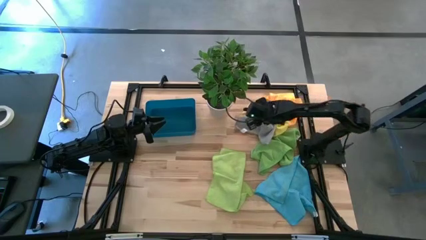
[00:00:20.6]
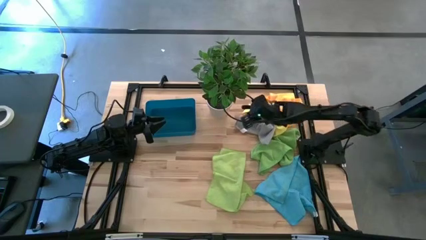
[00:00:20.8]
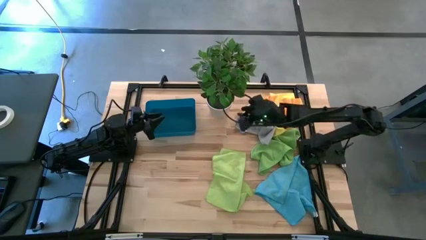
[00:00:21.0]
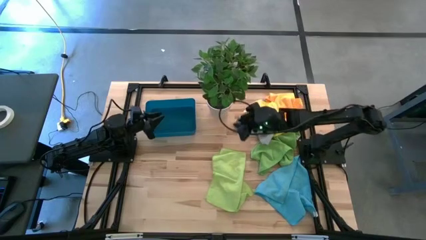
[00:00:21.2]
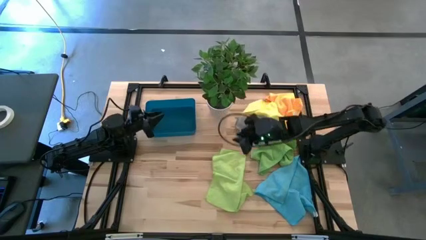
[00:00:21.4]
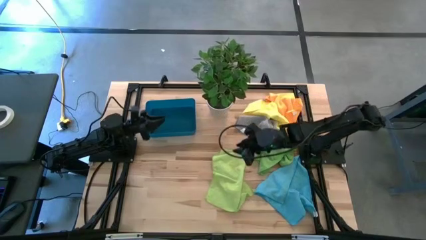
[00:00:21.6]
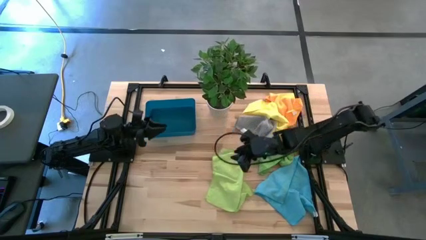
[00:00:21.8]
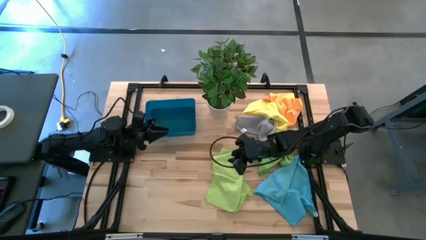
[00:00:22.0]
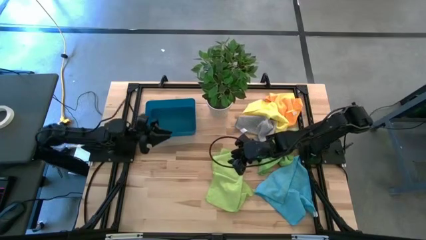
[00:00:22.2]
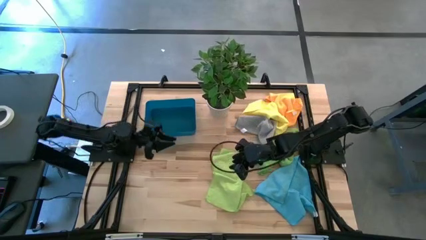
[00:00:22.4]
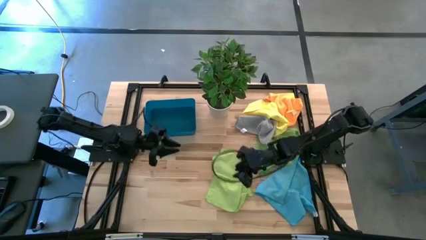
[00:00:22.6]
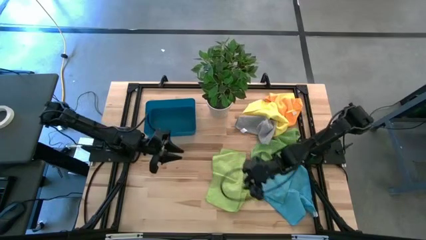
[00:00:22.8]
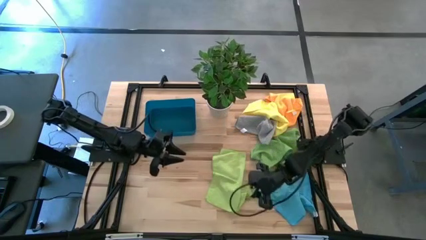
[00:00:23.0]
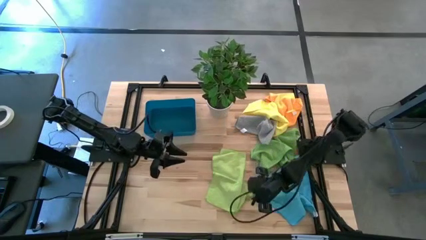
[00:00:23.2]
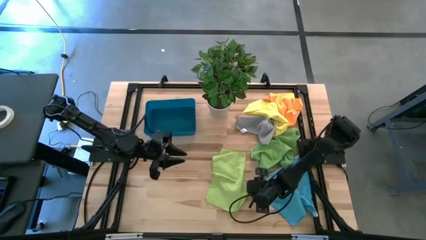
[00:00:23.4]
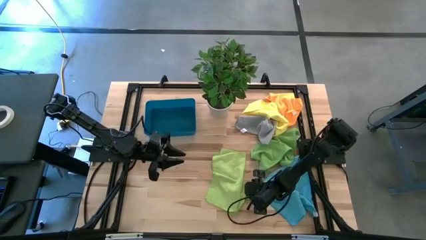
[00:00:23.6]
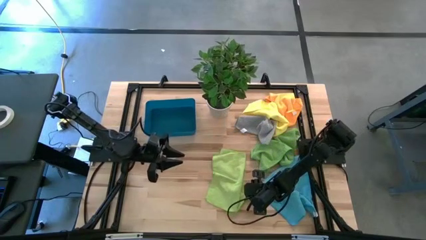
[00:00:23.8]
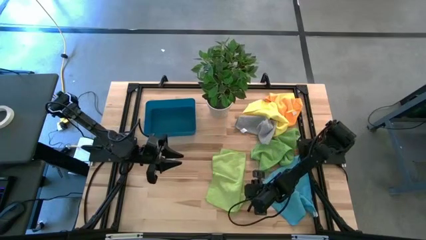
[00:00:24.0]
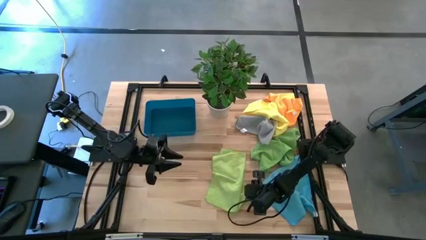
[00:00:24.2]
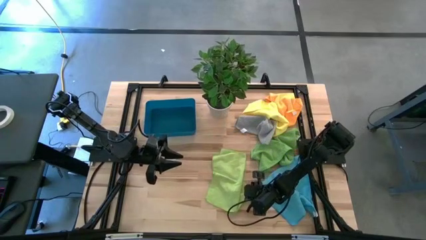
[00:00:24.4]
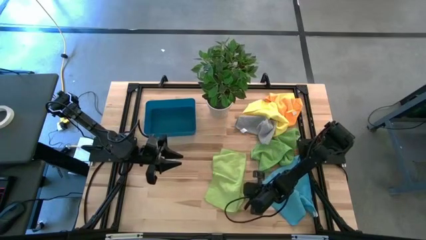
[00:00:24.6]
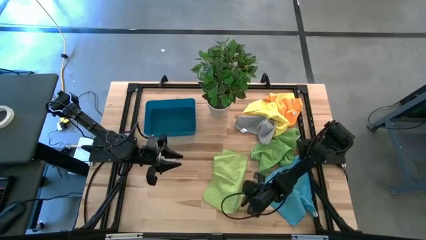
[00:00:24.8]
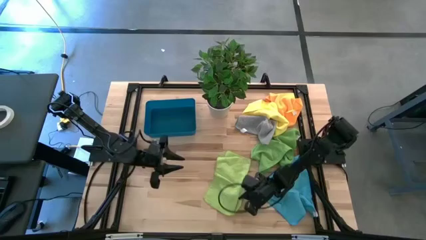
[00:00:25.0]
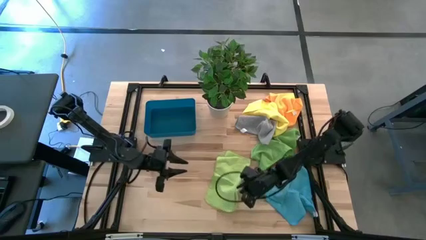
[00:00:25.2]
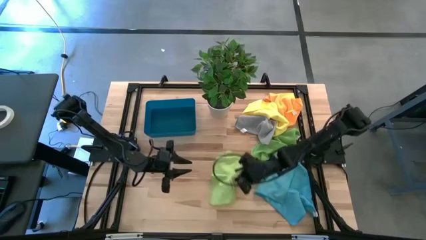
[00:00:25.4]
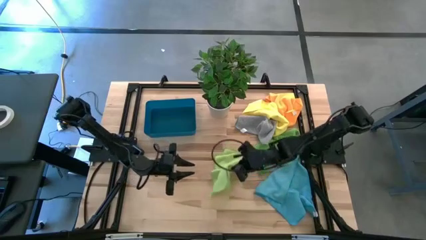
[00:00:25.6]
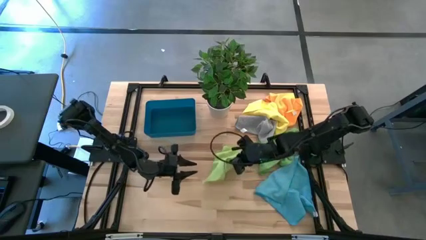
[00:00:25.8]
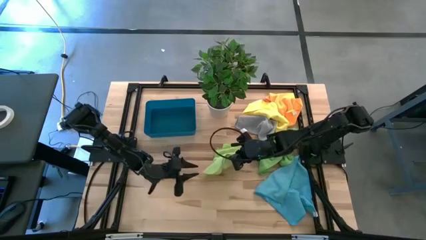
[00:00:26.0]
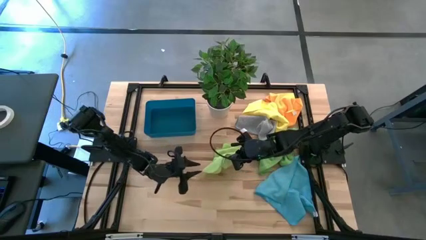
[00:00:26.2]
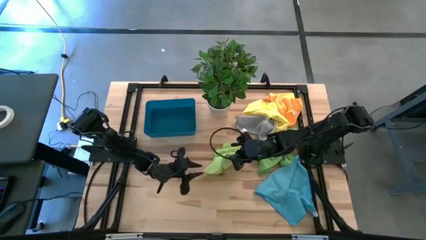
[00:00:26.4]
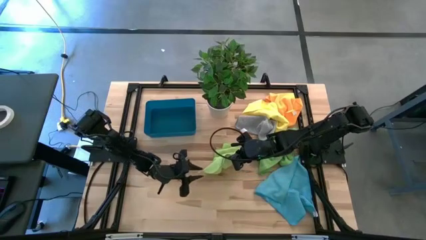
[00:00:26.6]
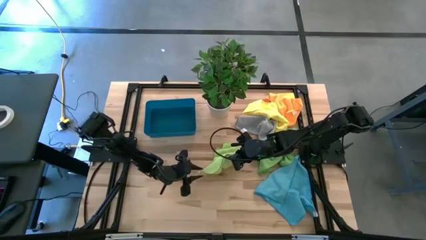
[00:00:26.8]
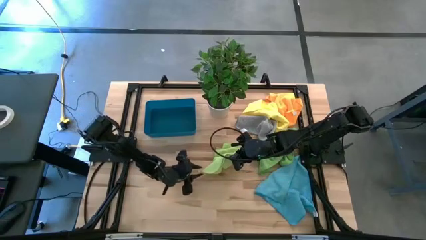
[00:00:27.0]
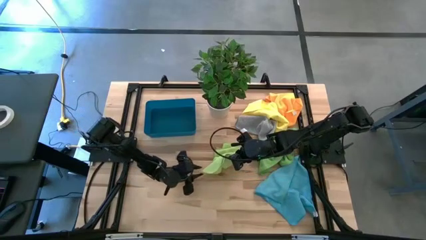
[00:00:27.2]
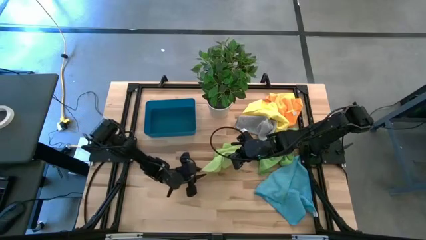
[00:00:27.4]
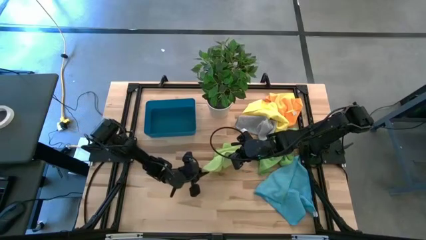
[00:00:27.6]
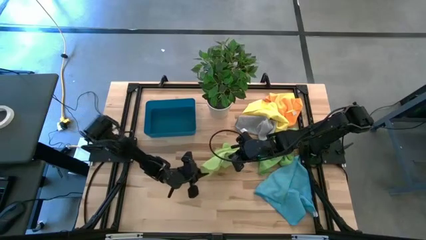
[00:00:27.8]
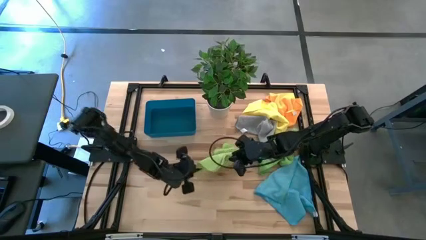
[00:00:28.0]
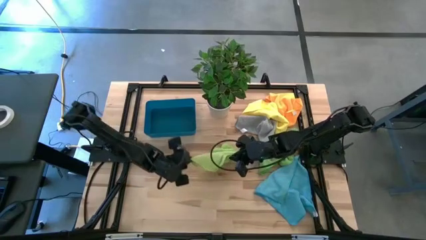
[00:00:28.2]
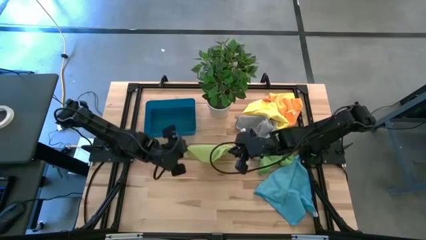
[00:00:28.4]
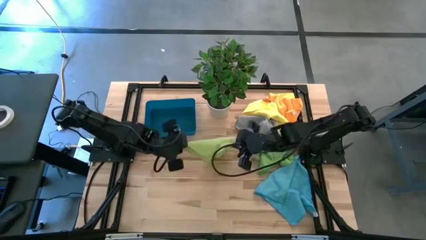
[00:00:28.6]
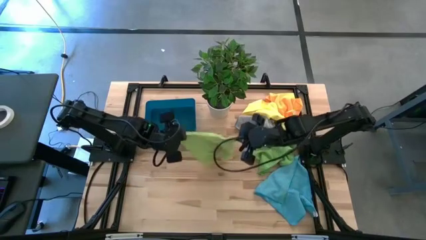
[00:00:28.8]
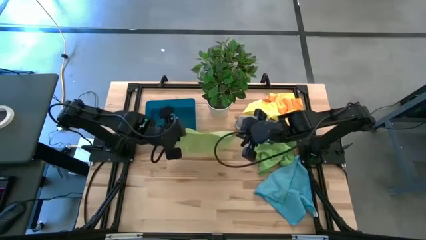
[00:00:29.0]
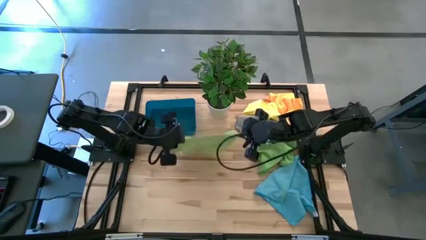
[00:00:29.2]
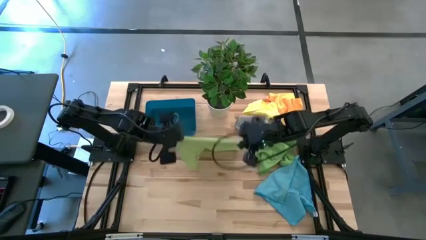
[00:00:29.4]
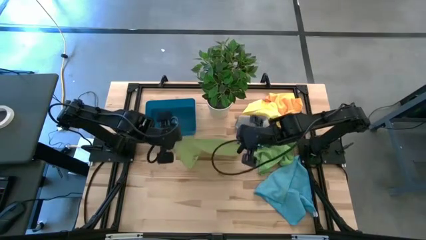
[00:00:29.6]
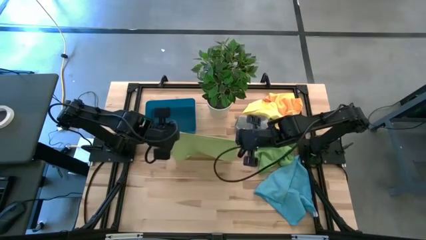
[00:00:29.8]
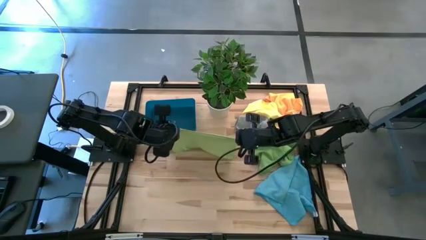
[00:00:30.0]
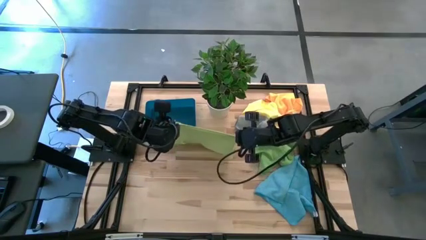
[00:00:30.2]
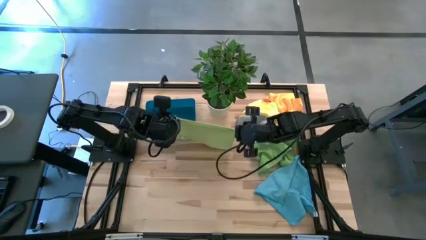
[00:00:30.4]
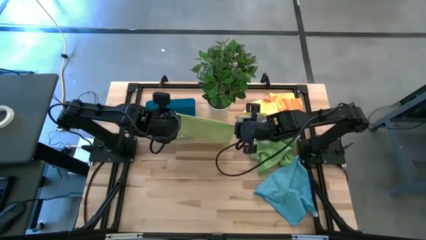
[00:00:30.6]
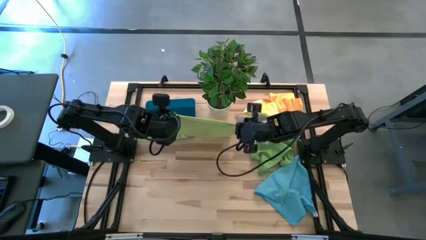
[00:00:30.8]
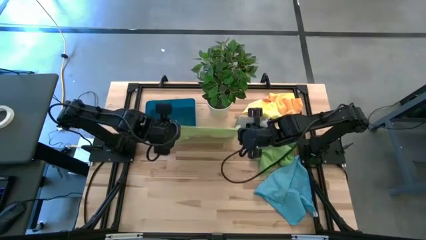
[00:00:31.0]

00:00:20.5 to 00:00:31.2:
Task: Fold microfiber towels
Fold the light green towel
